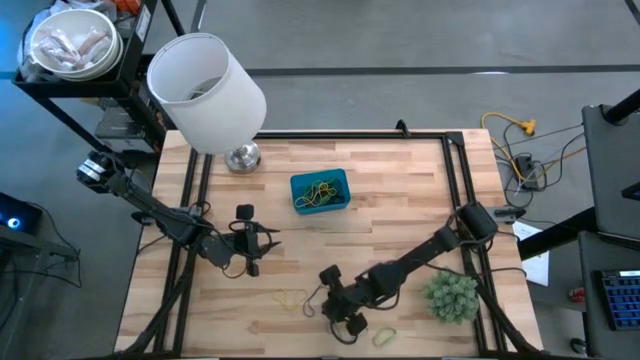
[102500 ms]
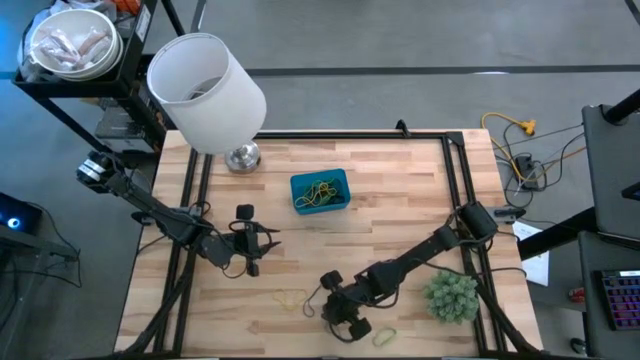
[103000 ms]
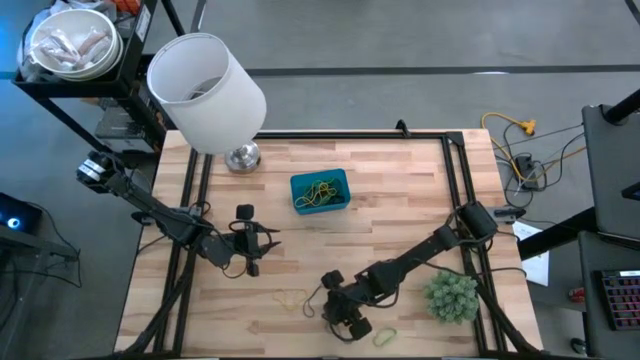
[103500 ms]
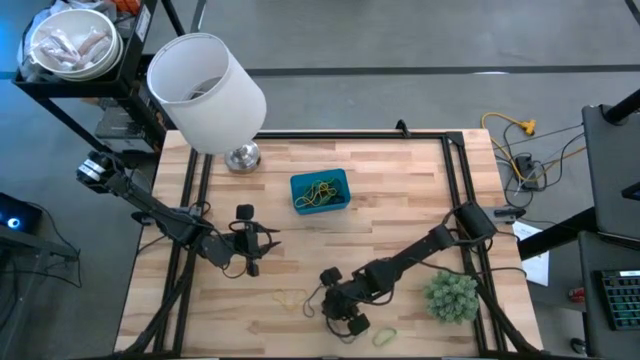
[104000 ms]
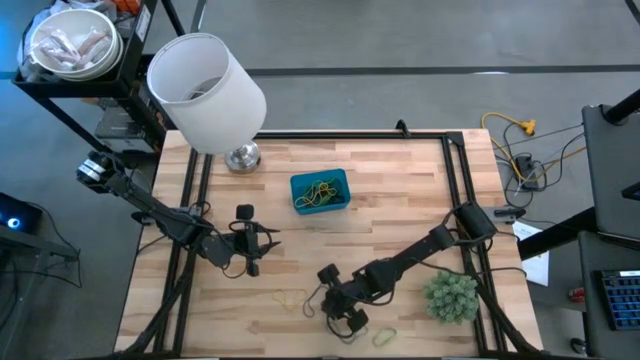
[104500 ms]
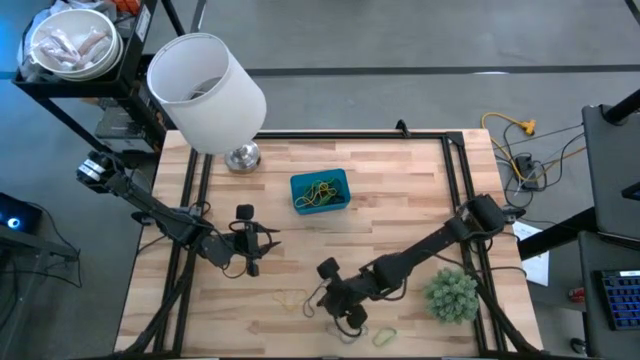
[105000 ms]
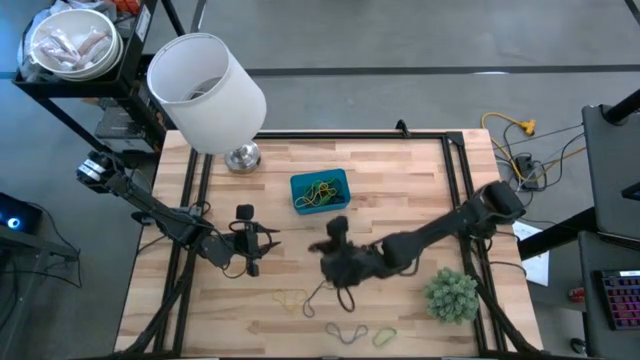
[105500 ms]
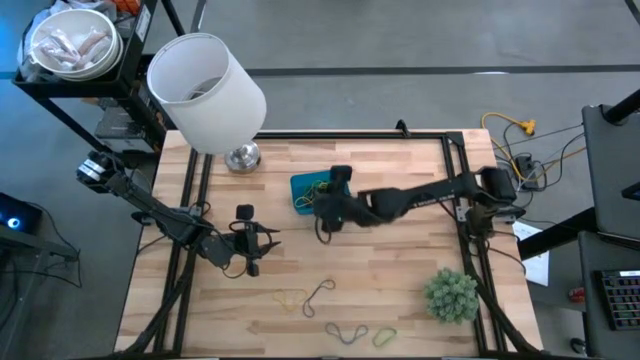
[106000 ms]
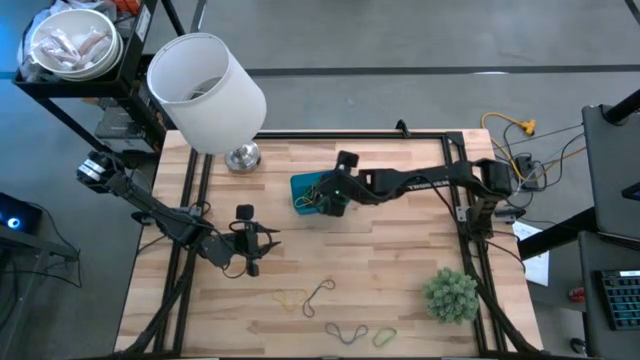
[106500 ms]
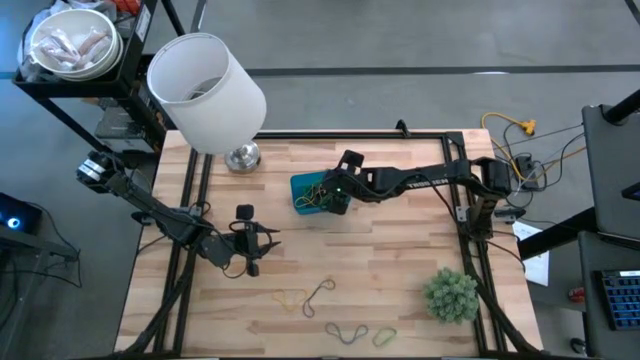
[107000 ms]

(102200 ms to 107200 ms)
Task: Pick and place rubber bands into bin
Put the black rubber band into the blue bin

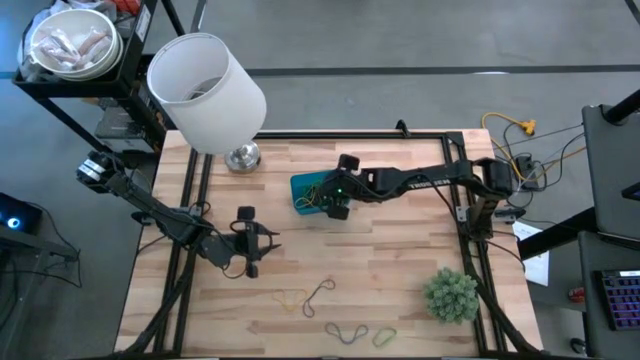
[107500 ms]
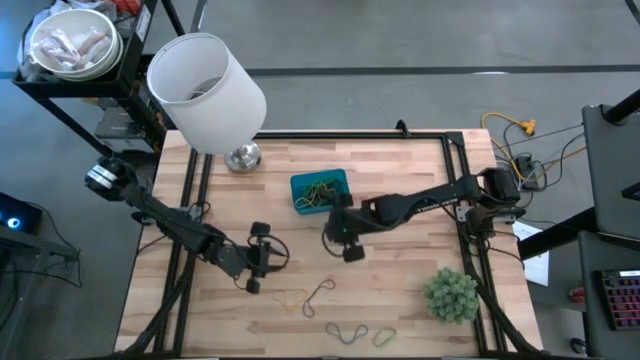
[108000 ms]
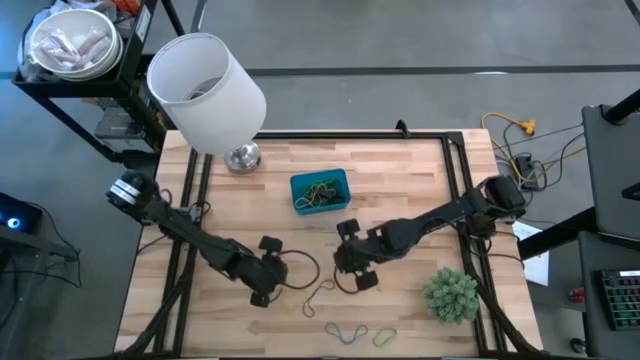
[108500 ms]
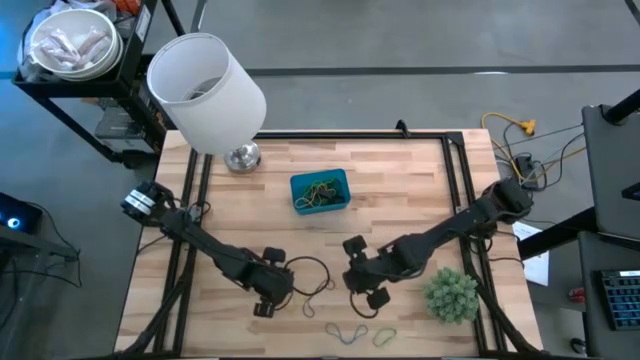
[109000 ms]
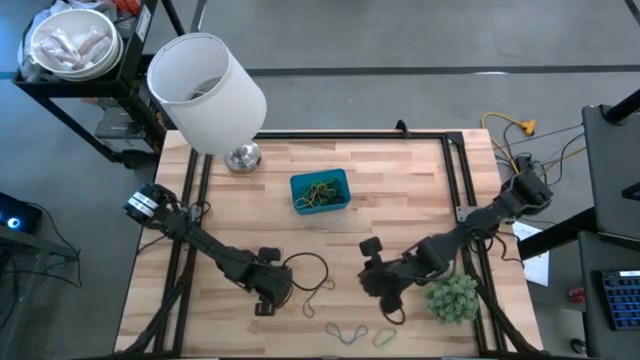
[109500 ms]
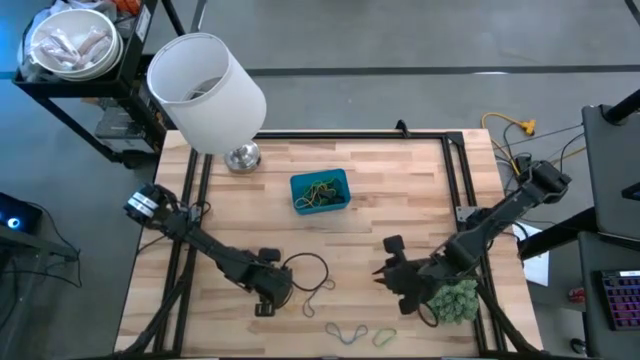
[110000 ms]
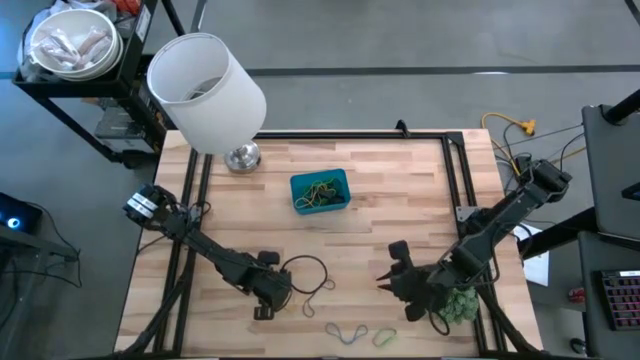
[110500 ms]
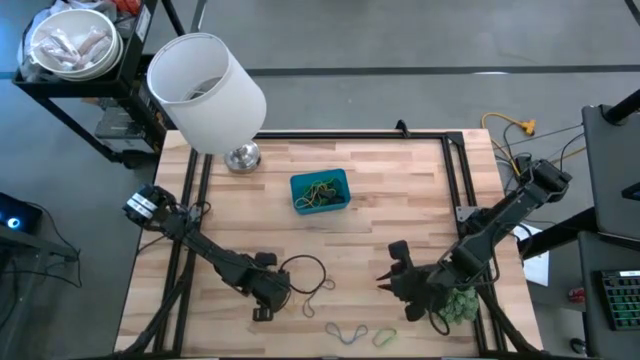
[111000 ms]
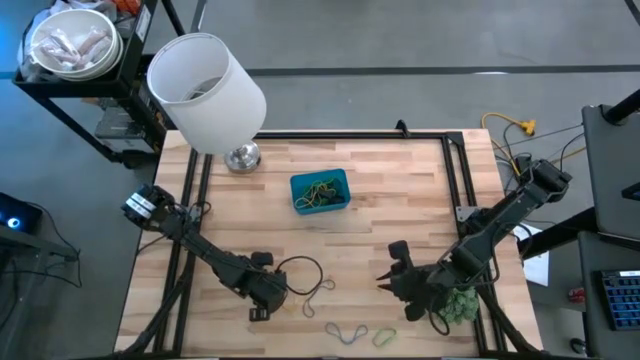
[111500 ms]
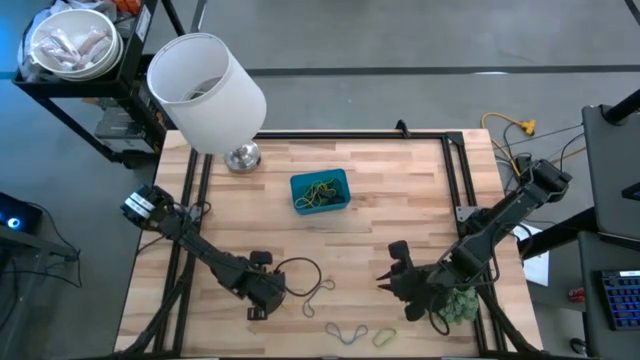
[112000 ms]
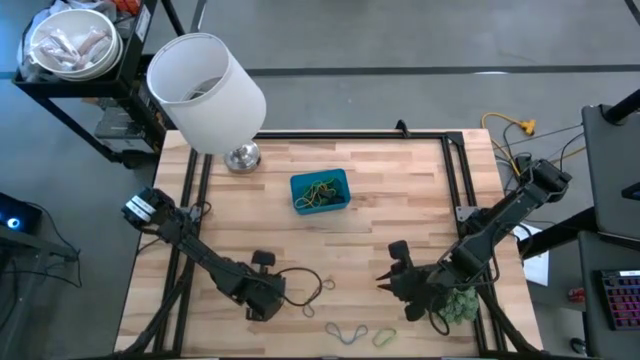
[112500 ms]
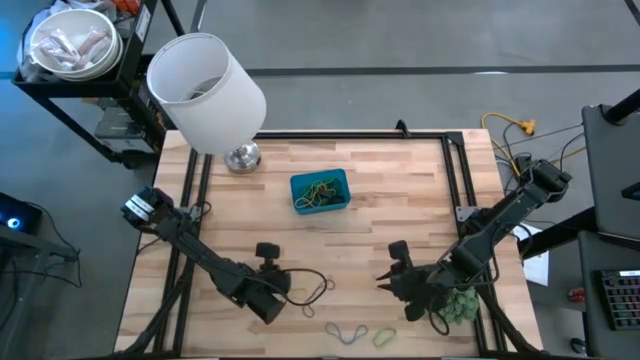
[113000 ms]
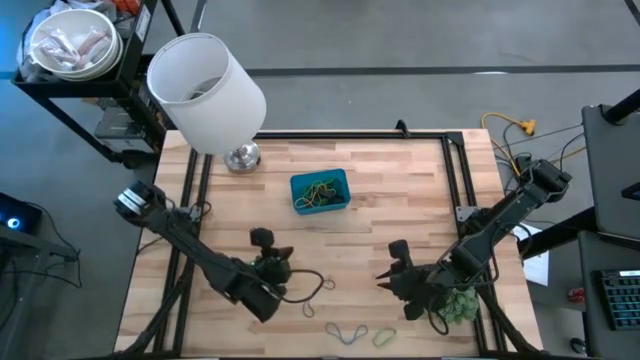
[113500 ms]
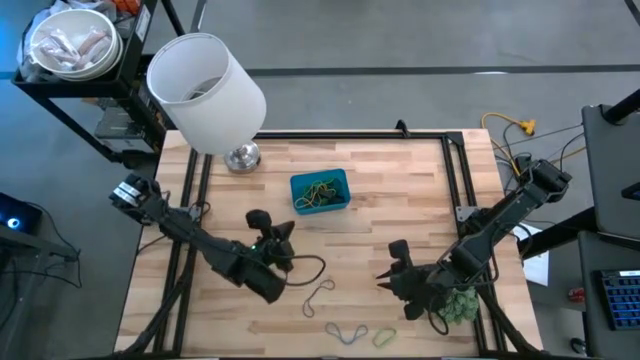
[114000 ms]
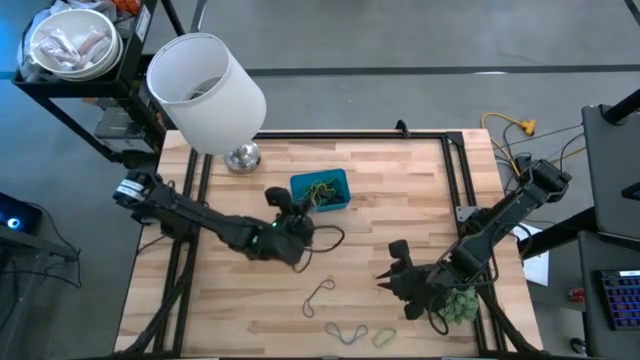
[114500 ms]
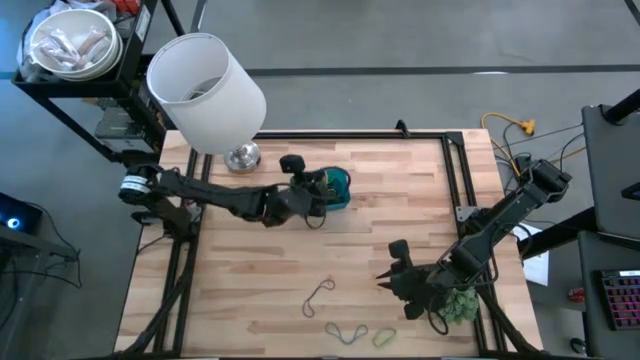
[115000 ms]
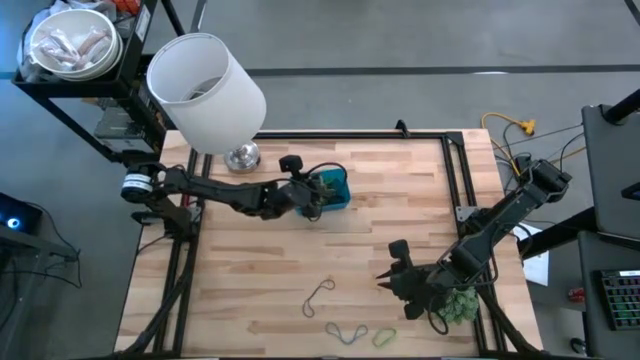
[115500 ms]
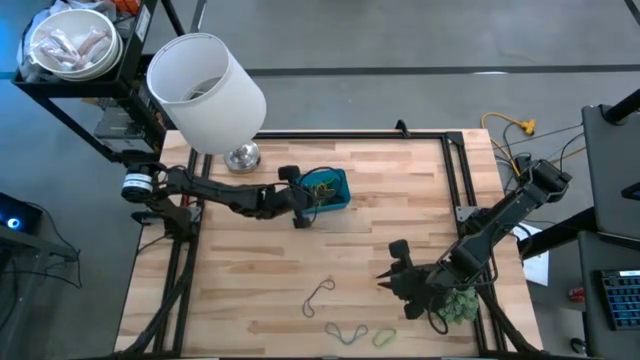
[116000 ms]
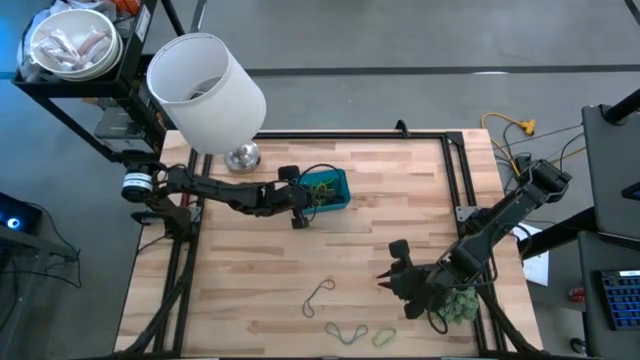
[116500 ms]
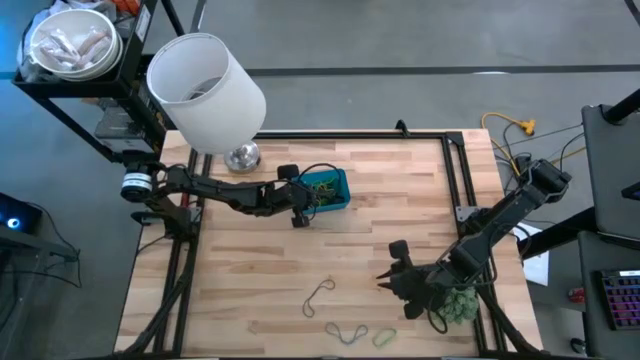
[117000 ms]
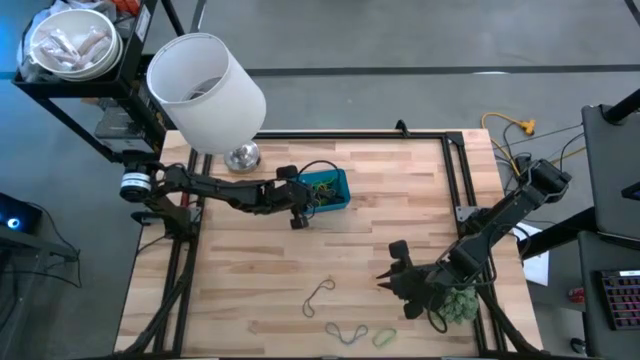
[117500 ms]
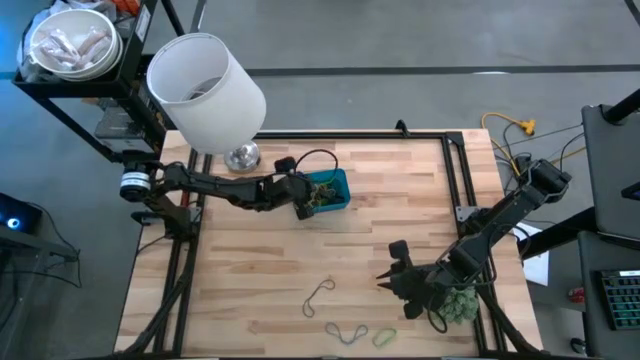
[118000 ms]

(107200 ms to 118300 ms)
Put the yellow rubber band into the blue bin

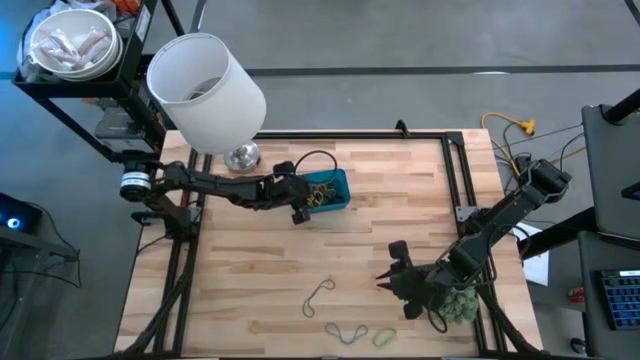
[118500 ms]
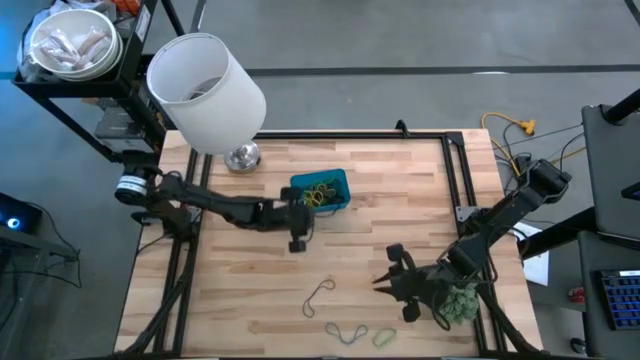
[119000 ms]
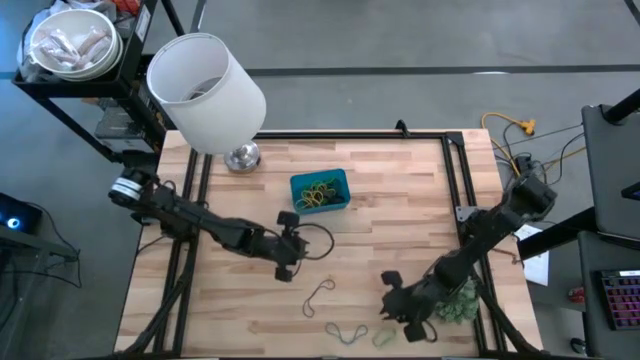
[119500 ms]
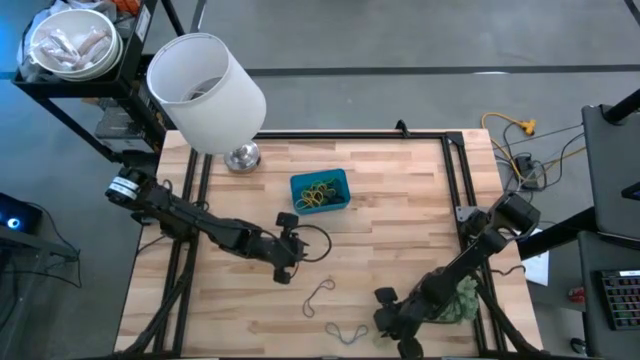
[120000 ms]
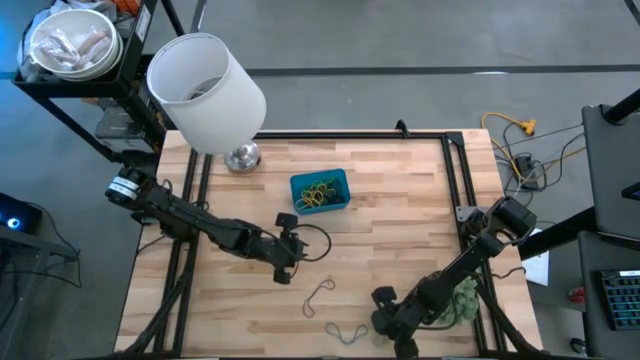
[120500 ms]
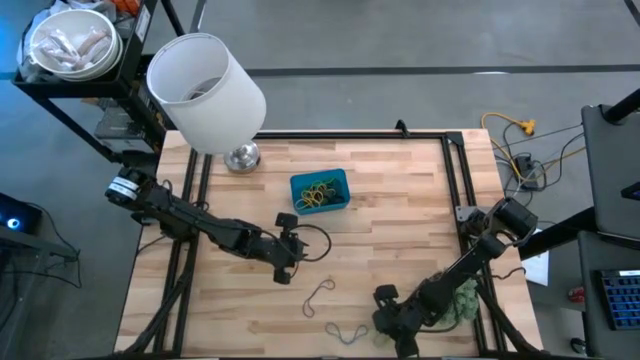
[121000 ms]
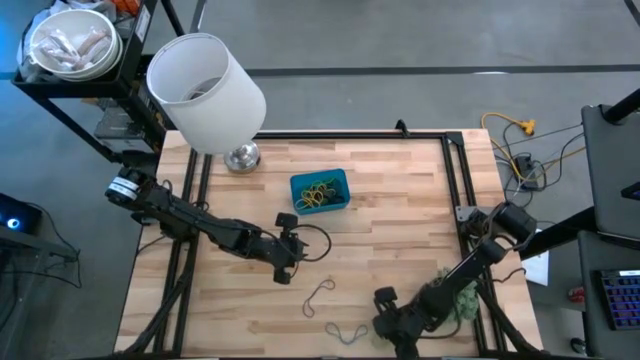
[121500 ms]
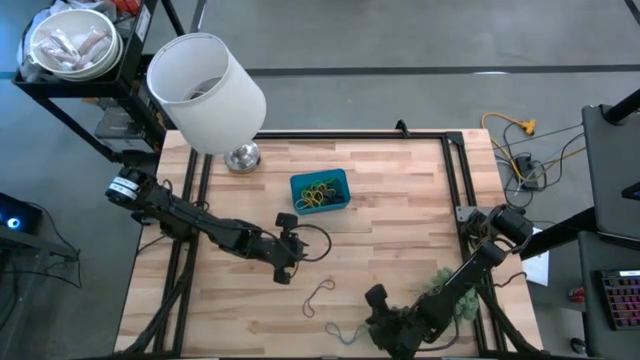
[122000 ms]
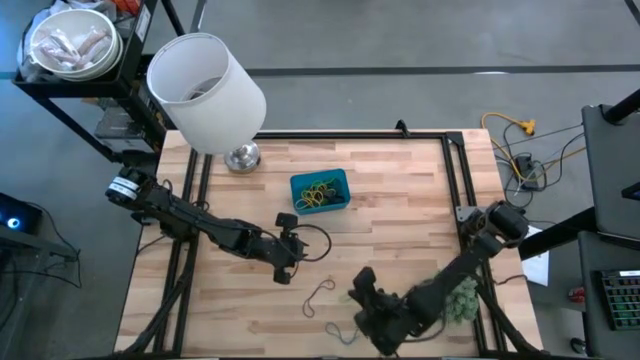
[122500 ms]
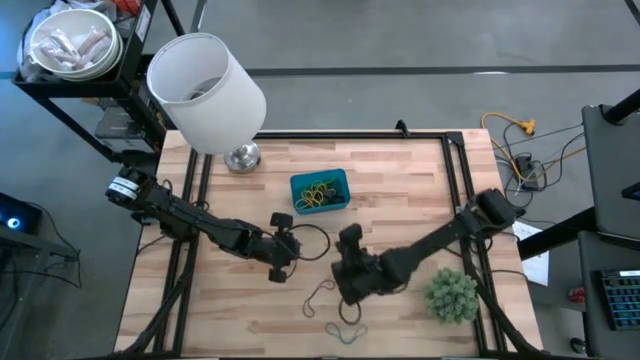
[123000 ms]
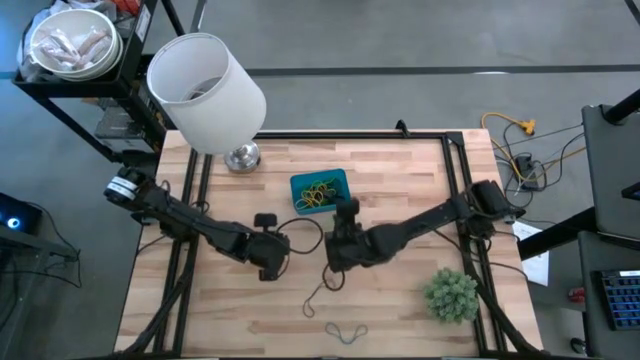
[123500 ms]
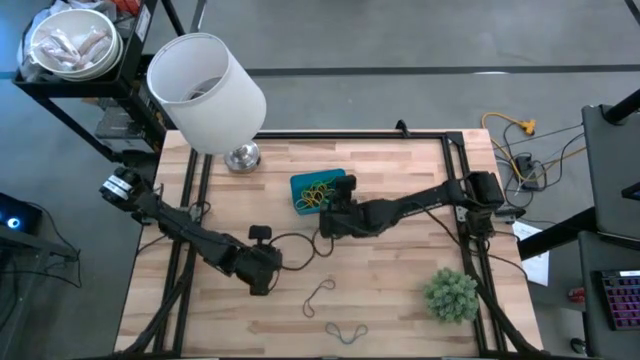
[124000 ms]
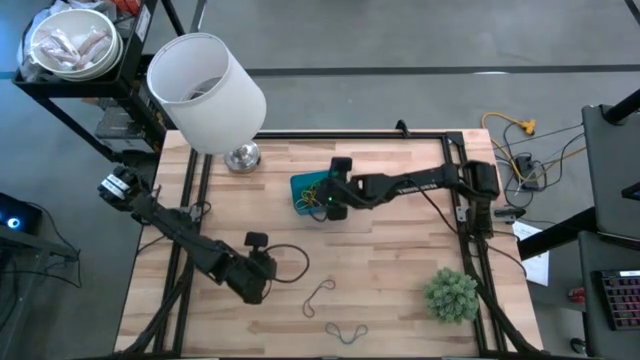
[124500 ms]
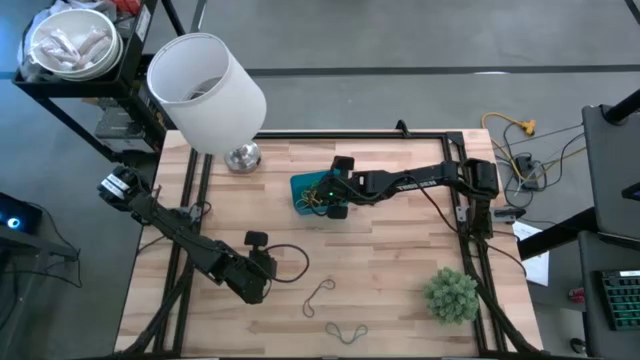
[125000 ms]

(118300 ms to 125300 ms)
Put the green rubber band into the blue bin
